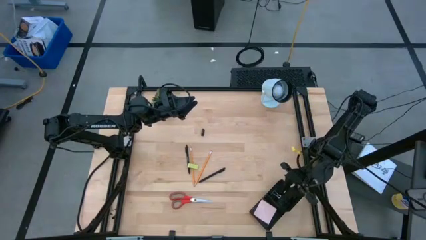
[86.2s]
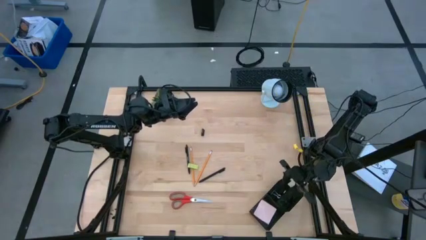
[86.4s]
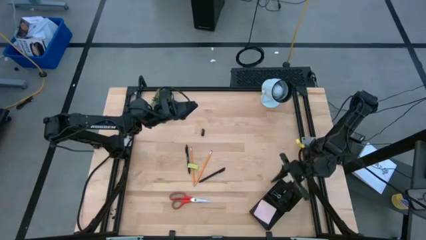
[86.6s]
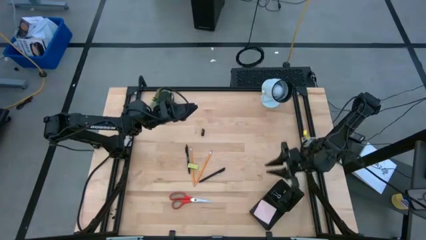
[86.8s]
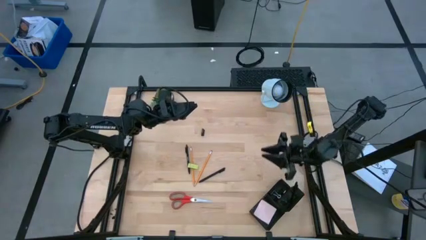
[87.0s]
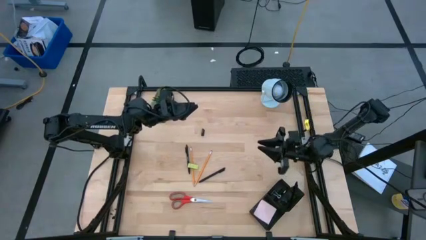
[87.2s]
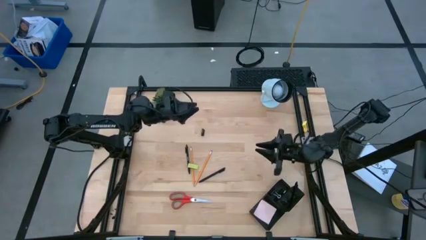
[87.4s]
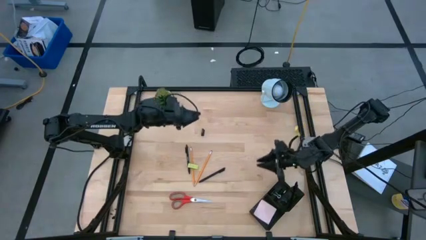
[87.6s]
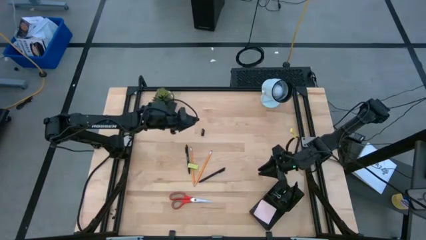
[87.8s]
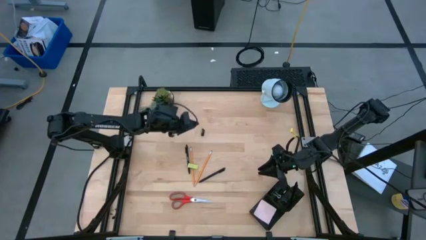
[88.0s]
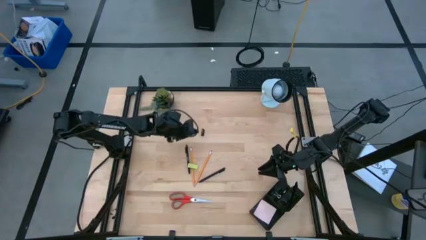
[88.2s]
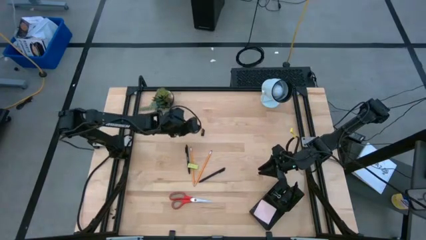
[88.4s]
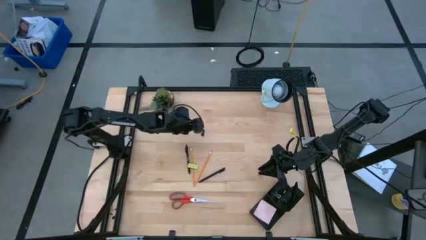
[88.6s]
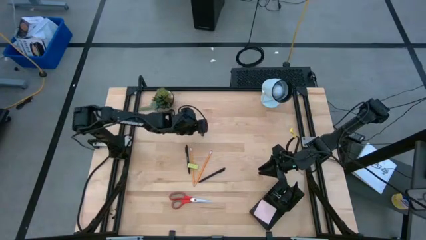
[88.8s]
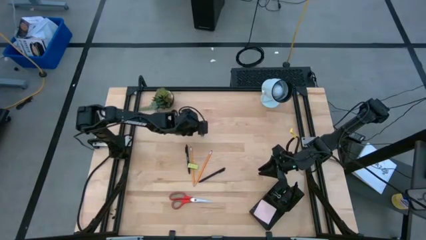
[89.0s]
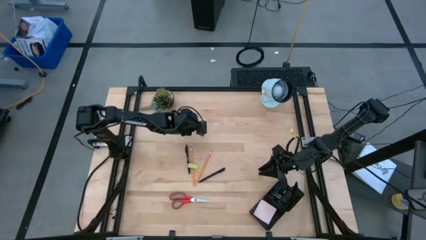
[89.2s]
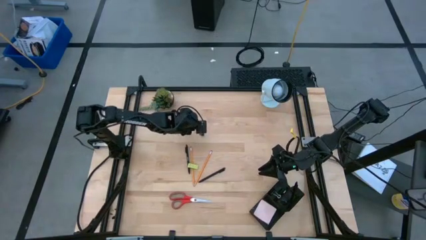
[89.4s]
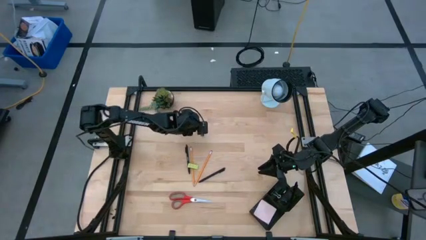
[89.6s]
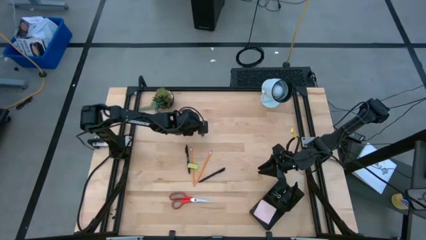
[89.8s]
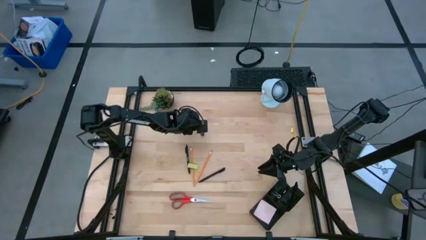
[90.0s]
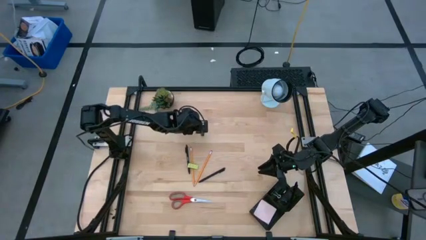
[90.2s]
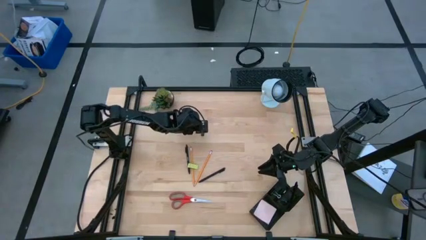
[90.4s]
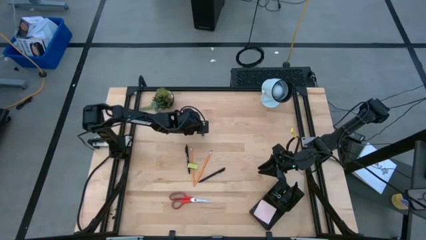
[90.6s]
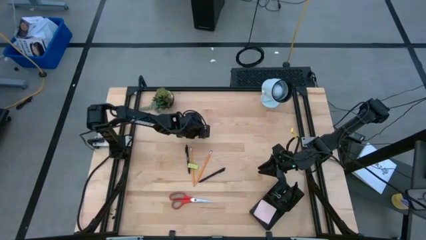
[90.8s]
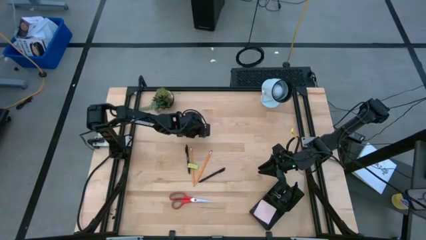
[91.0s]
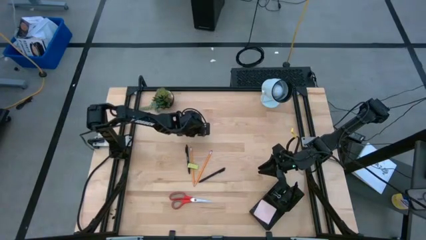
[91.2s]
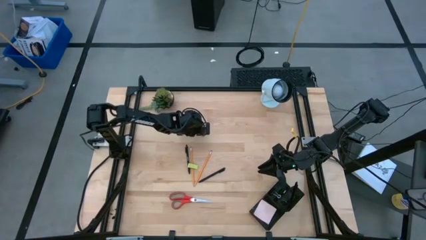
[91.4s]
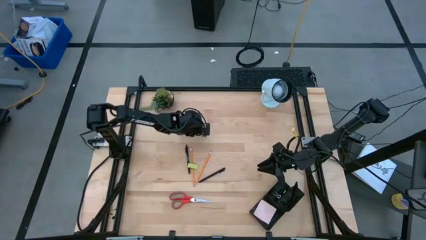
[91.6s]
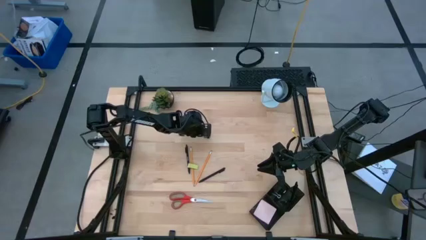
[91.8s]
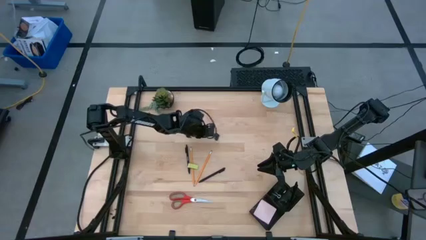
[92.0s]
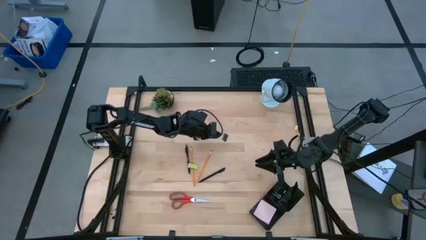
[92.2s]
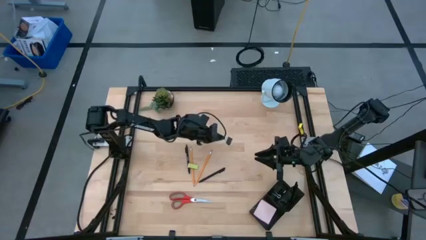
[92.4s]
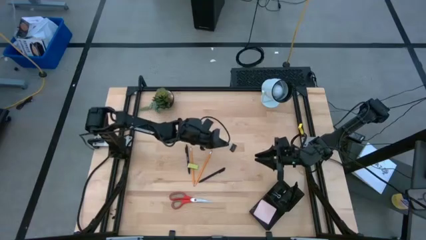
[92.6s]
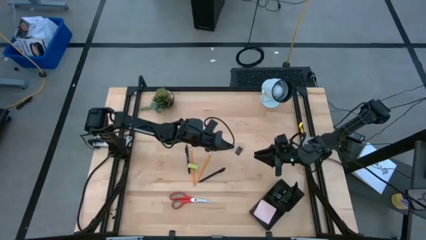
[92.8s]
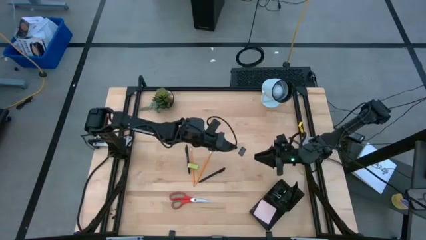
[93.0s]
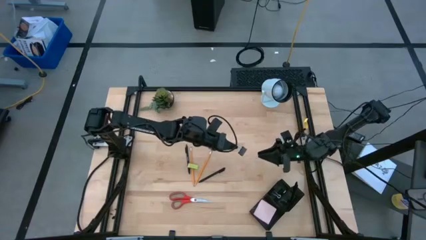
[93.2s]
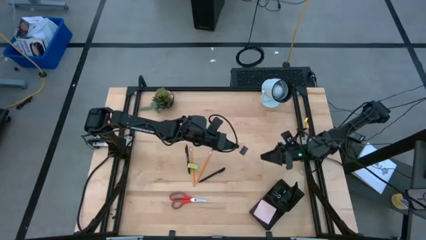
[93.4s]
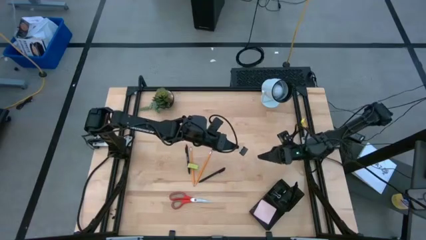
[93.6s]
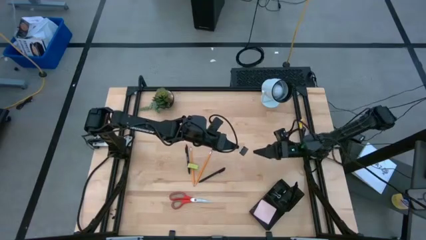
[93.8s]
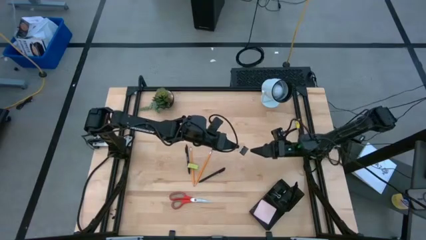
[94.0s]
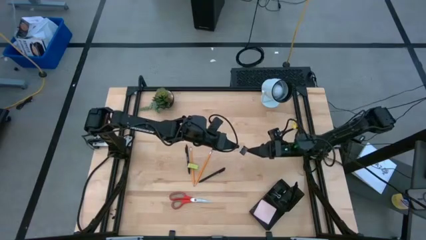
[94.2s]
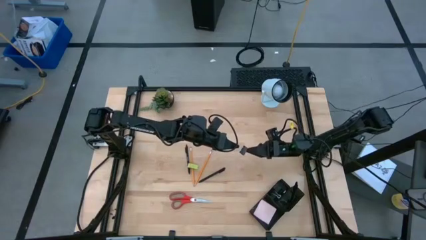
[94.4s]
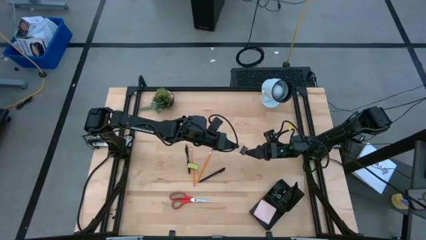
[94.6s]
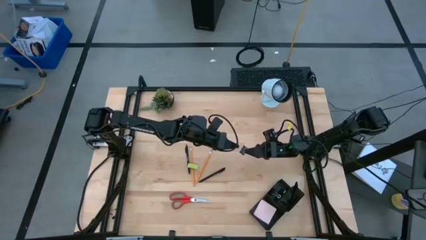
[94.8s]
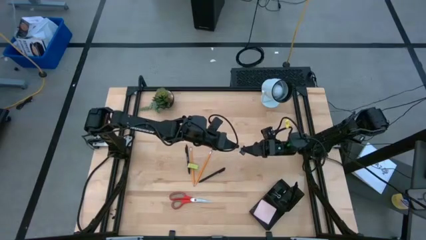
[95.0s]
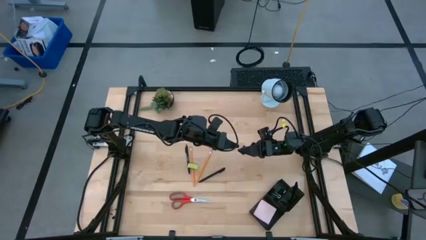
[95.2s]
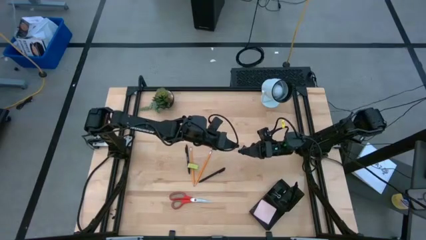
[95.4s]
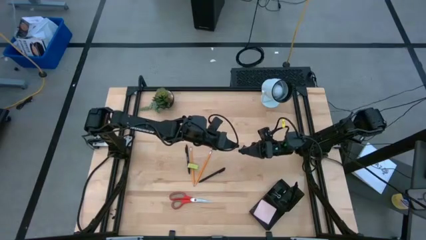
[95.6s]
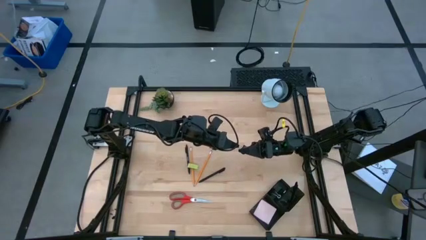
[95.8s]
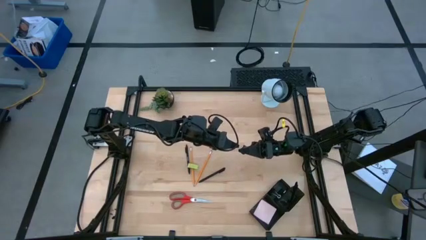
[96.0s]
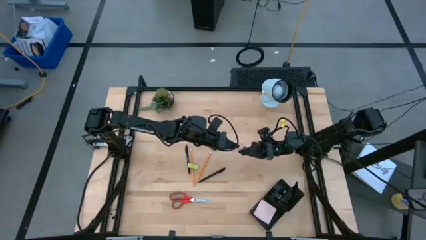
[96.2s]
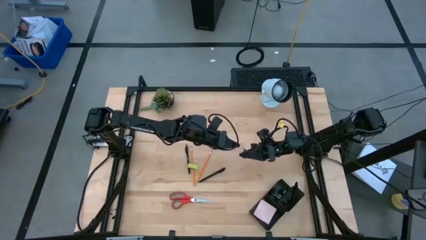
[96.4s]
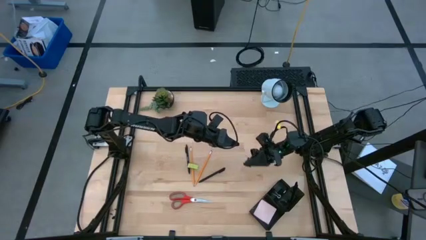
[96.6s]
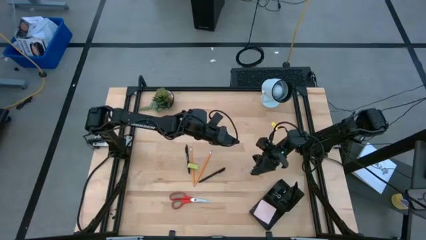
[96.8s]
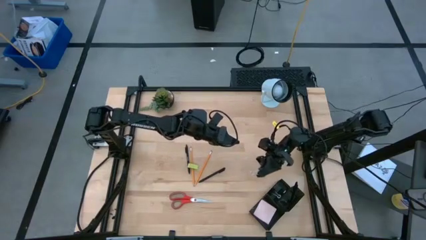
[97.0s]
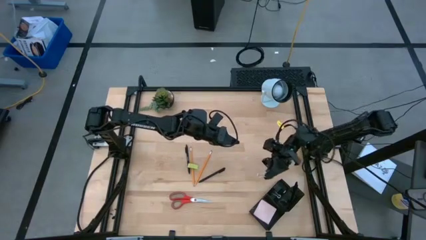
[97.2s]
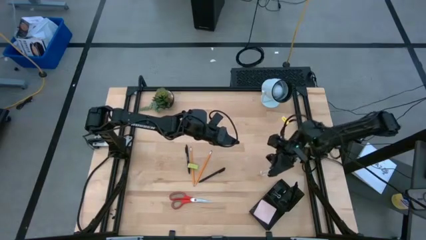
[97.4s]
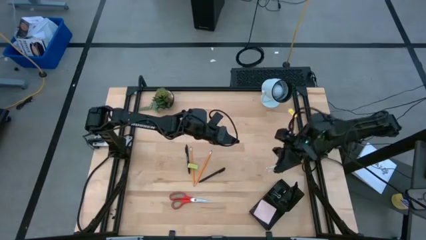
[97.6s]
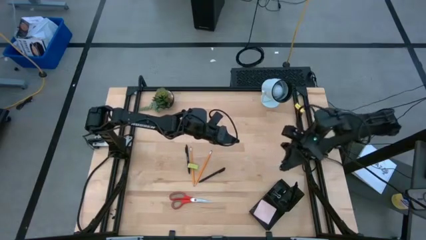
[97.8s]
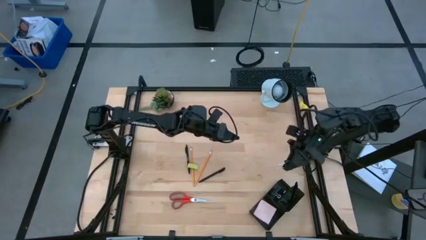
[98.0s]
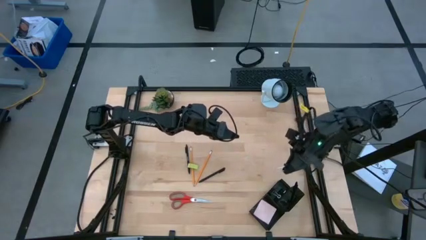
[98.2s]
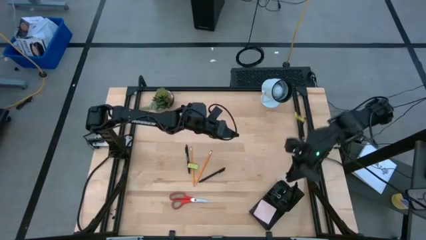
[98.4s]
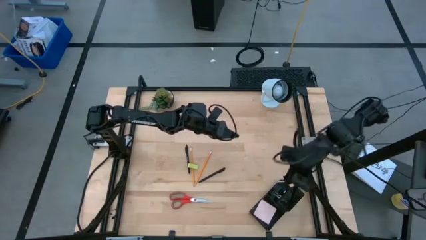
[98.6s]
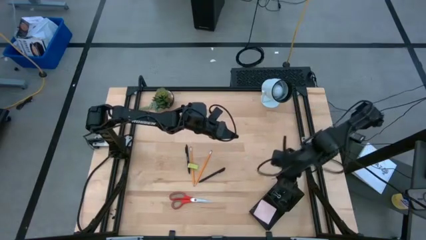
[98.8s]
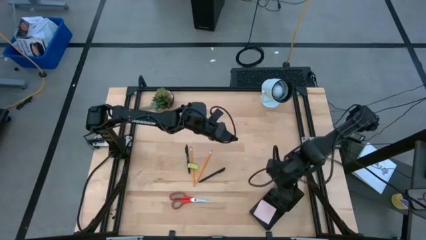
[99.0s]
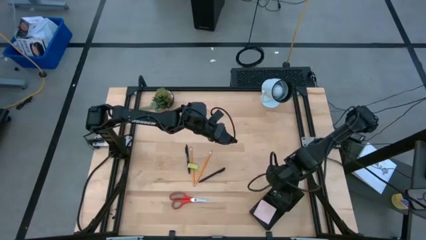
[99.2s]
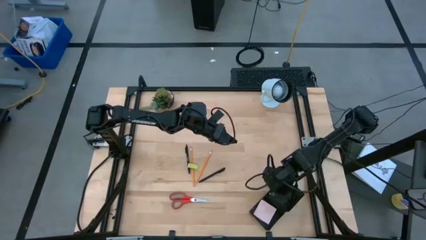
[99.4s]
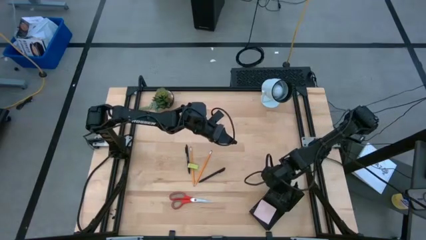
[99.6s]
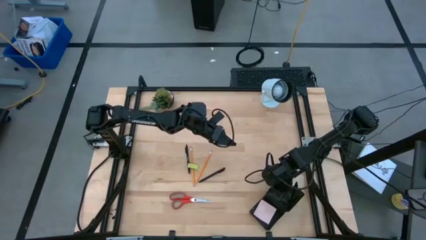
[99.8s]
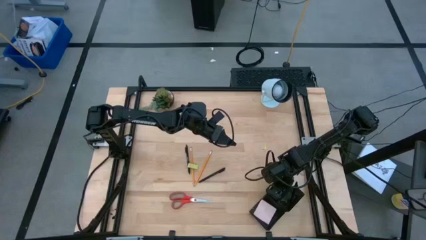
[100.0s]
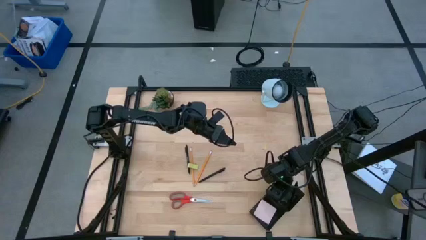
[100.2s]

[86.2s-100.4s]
Task: Pick and place office supplies into organizer
Put the black clip binder into the desk organizer

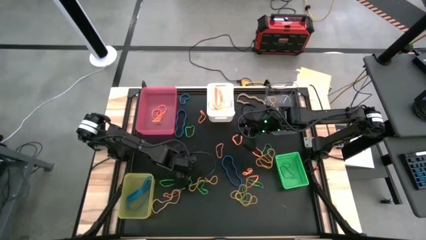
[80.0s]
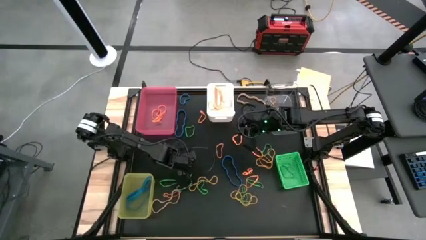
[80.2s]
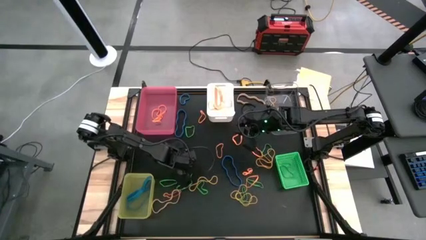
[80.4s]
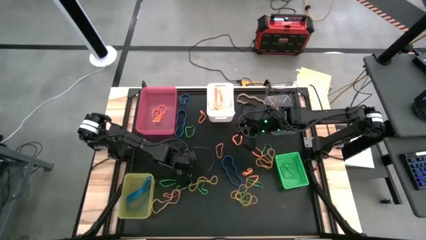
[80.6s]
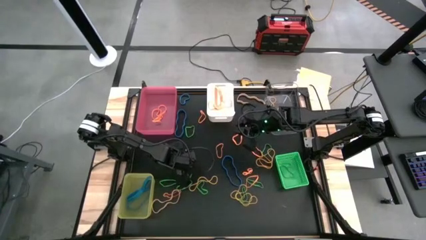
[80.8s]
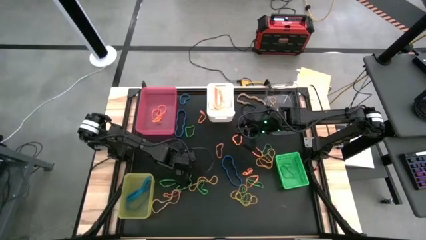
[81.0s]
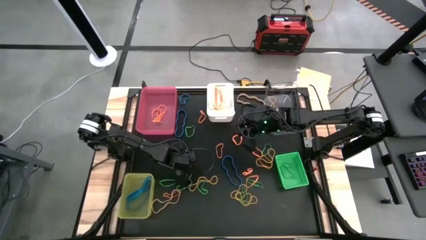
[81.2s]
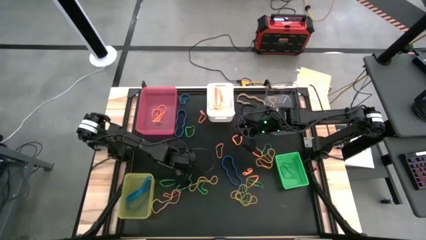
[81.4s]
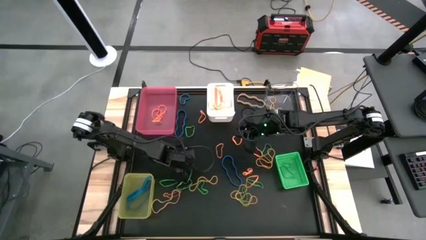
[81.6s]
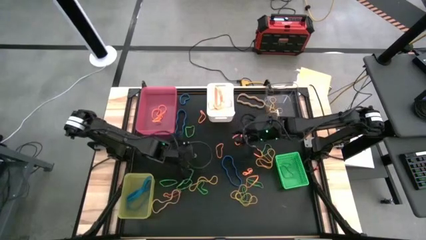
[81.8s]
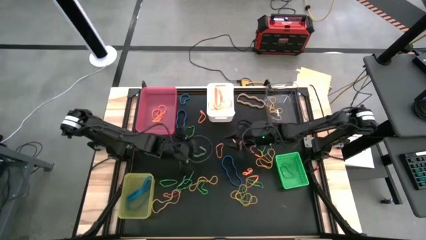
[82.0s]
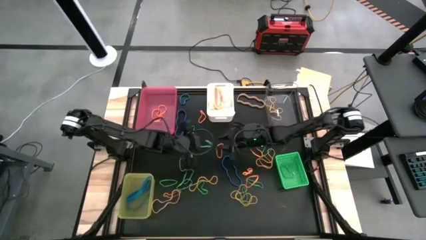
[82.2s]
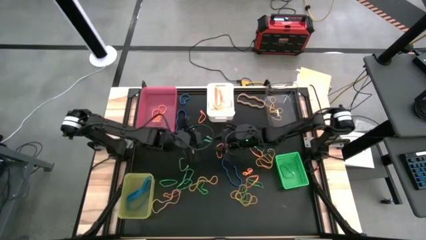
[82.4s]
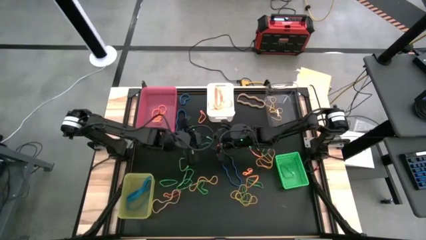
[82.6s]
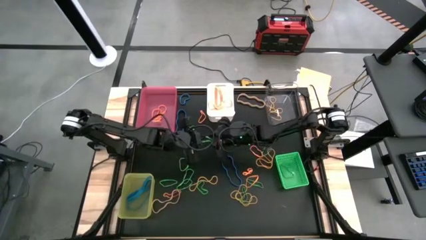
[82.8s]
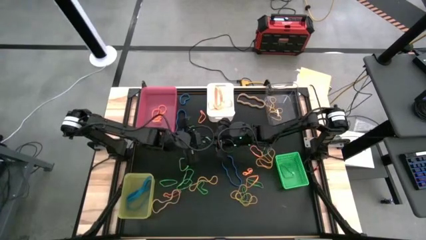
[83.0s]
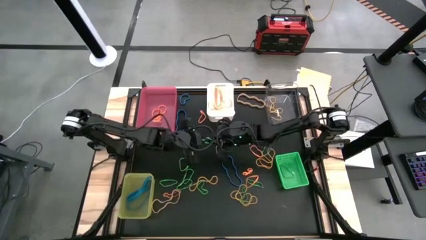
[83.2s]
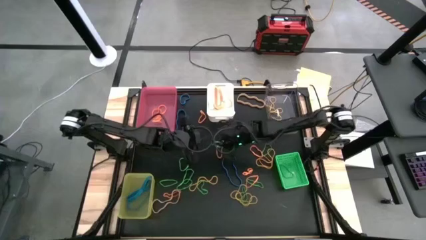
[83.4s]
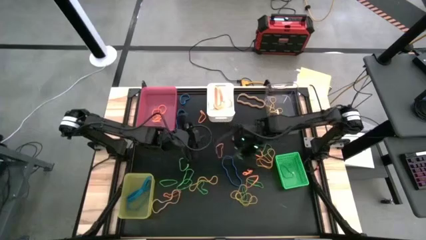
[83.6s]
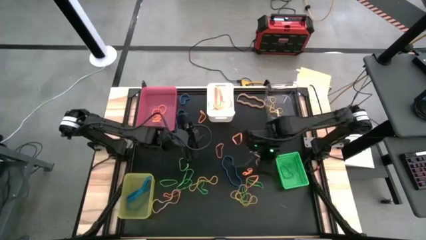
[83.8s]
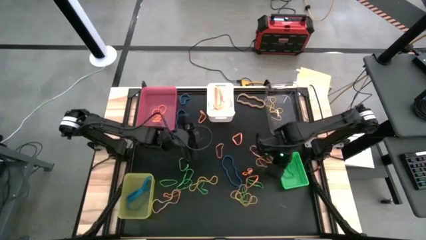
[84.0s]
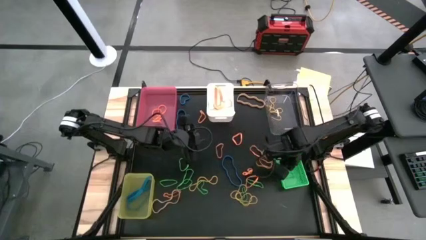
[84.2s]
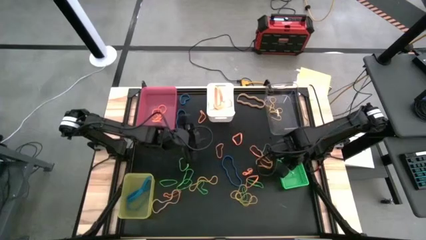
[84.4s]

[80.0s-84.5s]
Task: Sort rubber bands into baskets
Put the green rubber band into the green bin
